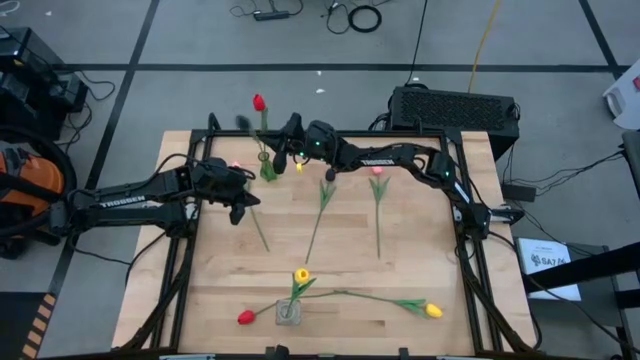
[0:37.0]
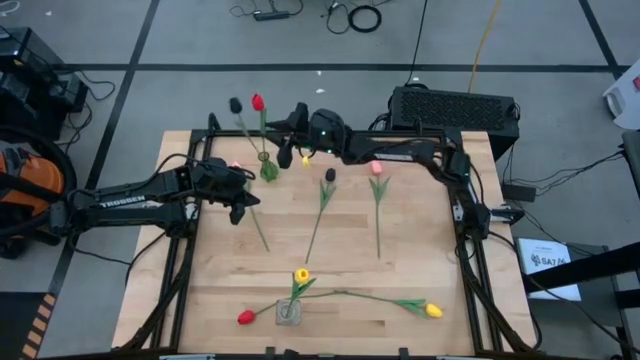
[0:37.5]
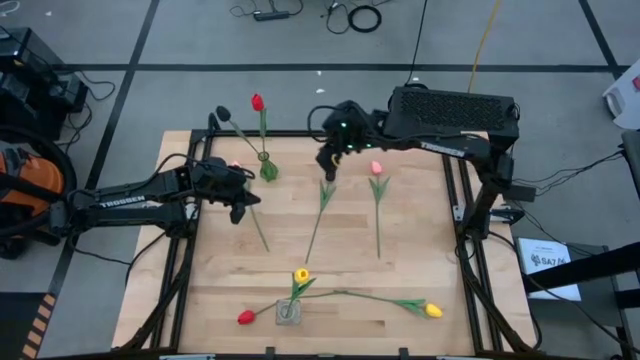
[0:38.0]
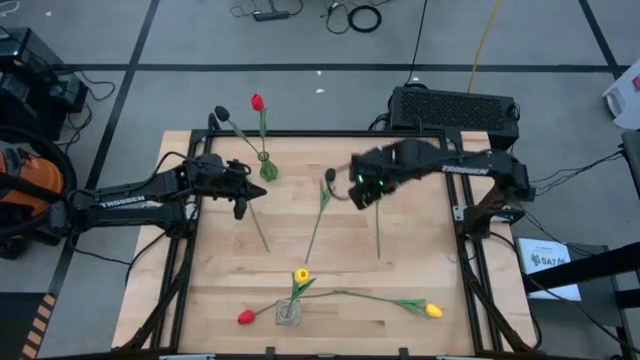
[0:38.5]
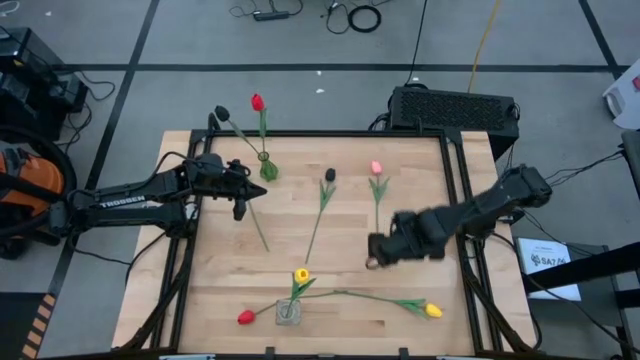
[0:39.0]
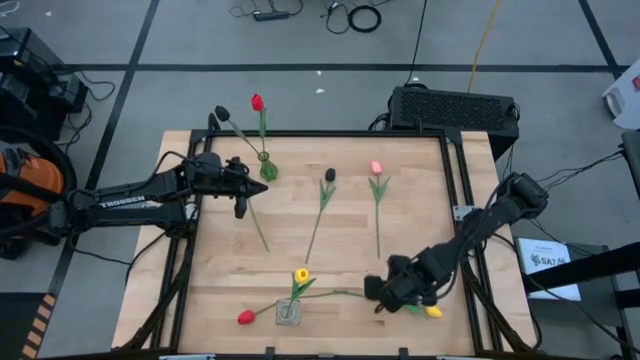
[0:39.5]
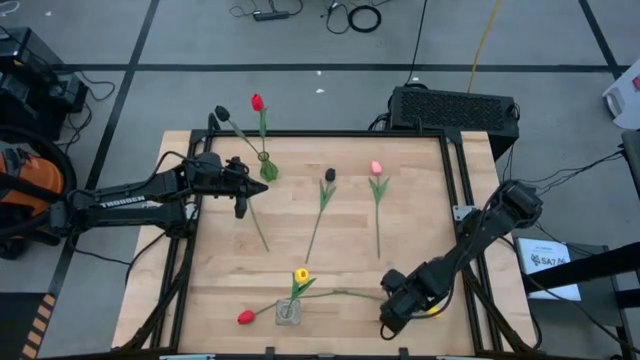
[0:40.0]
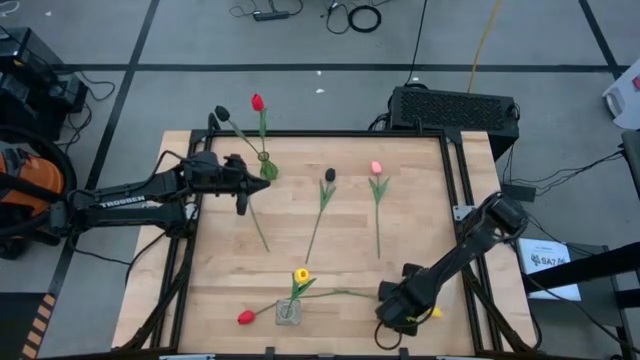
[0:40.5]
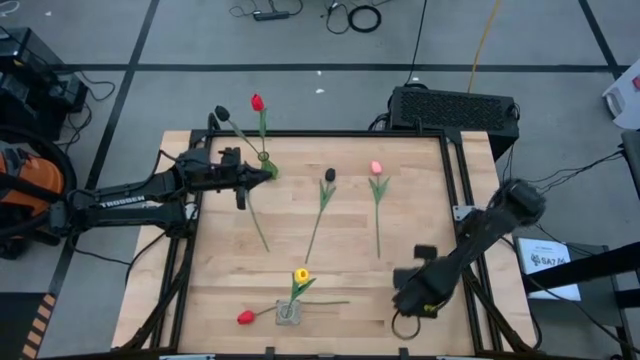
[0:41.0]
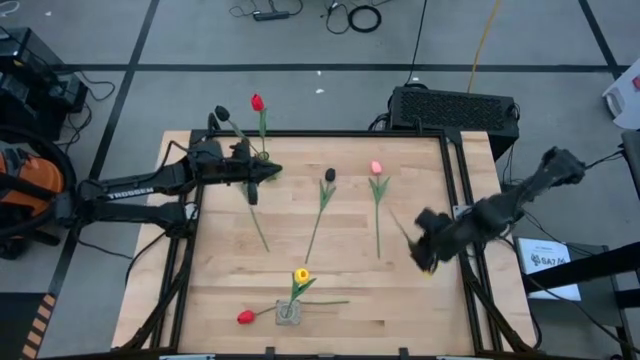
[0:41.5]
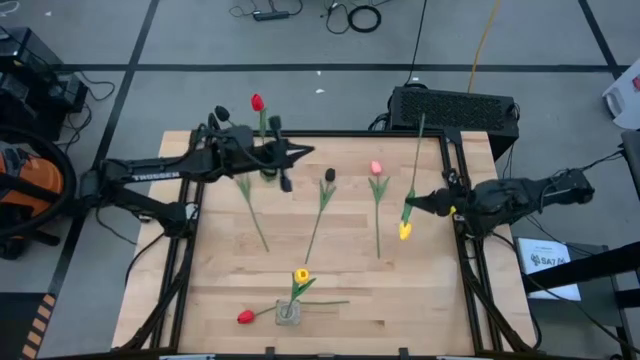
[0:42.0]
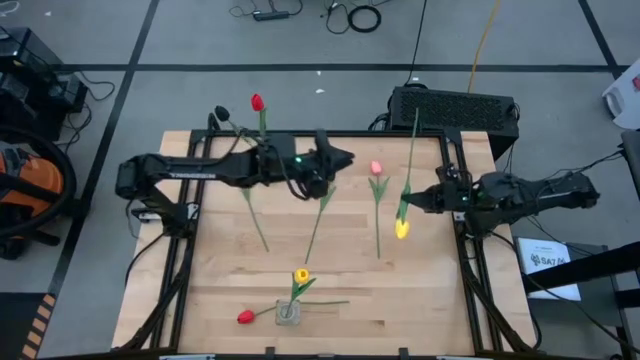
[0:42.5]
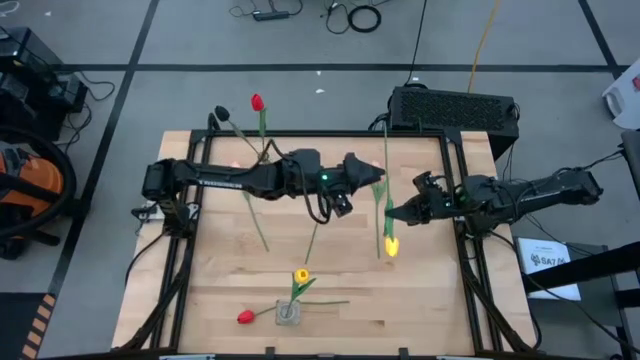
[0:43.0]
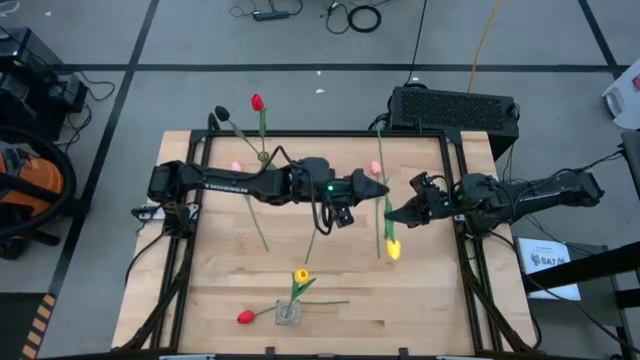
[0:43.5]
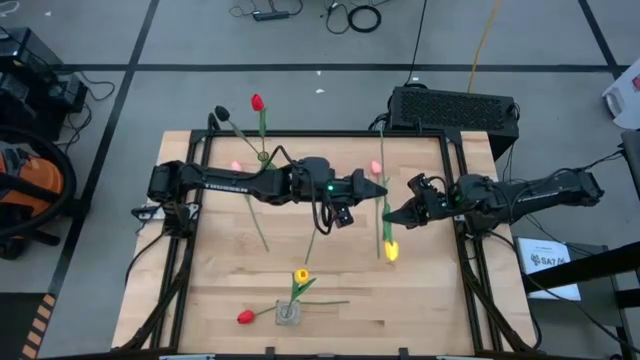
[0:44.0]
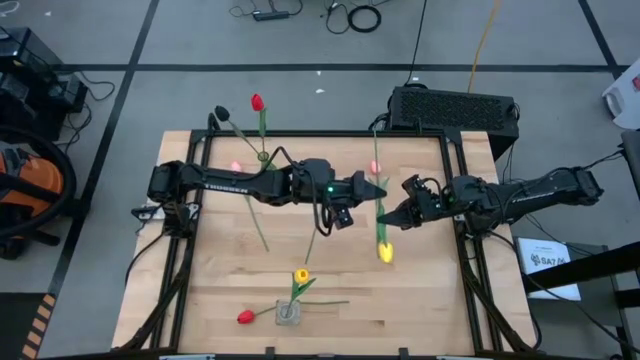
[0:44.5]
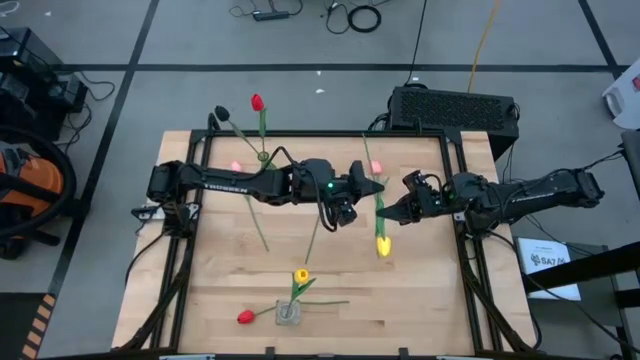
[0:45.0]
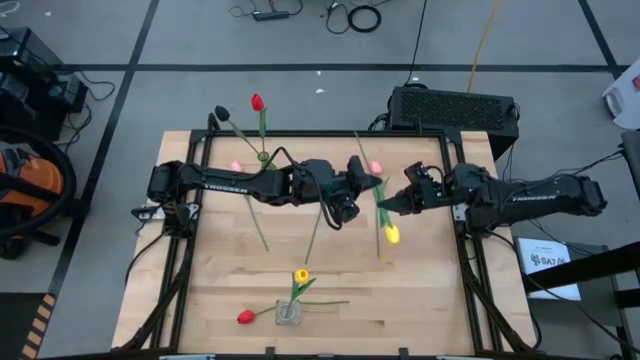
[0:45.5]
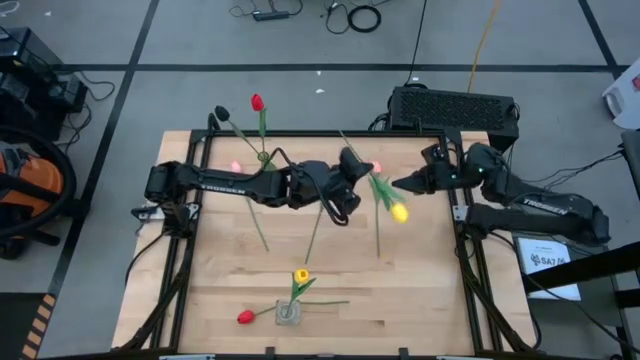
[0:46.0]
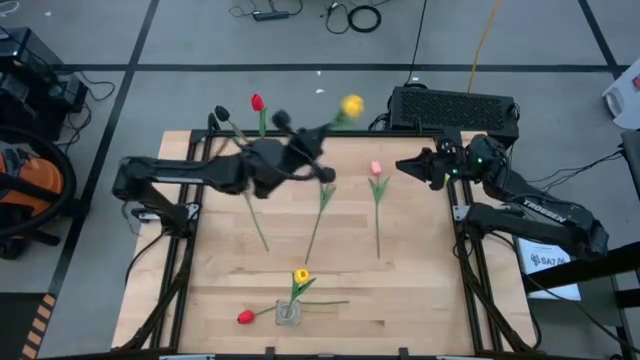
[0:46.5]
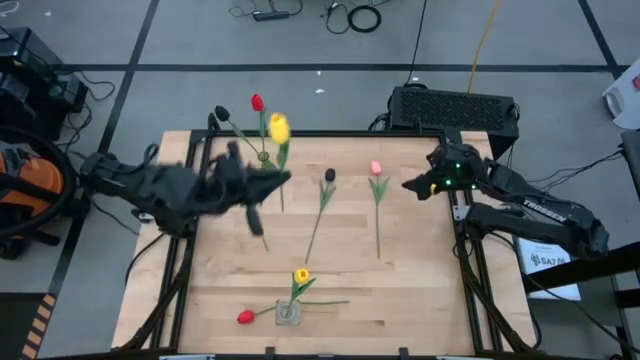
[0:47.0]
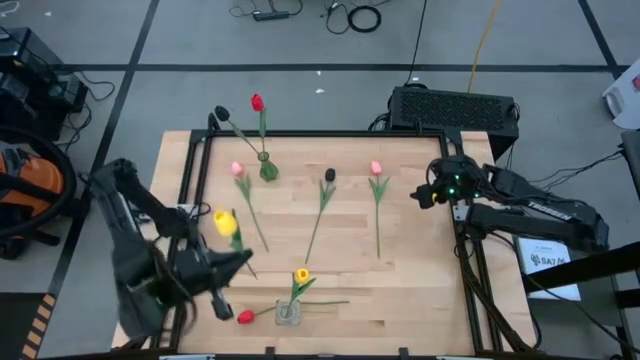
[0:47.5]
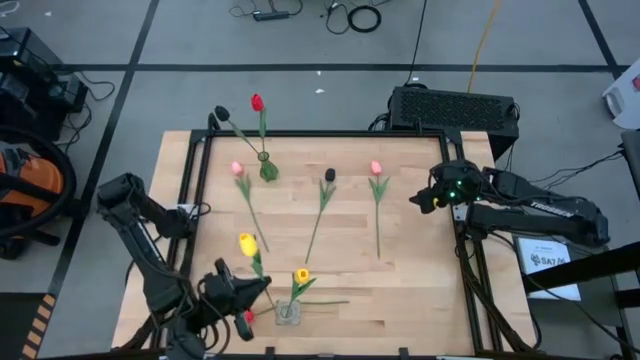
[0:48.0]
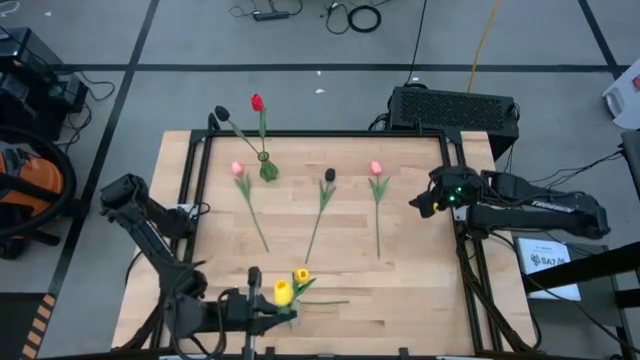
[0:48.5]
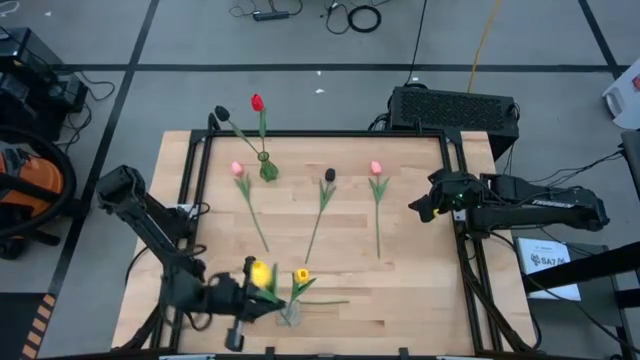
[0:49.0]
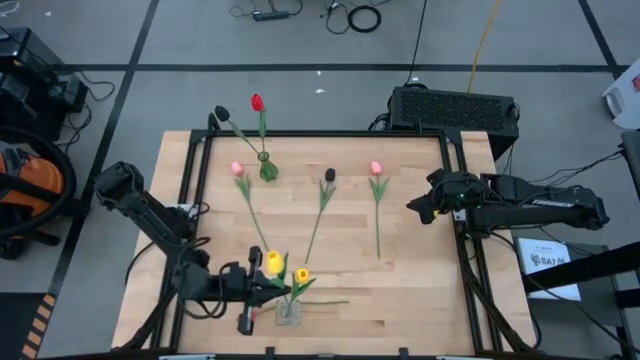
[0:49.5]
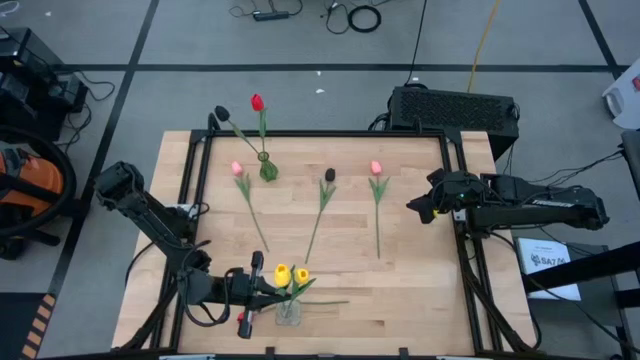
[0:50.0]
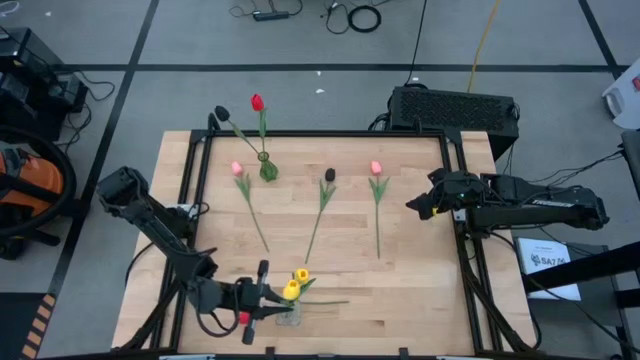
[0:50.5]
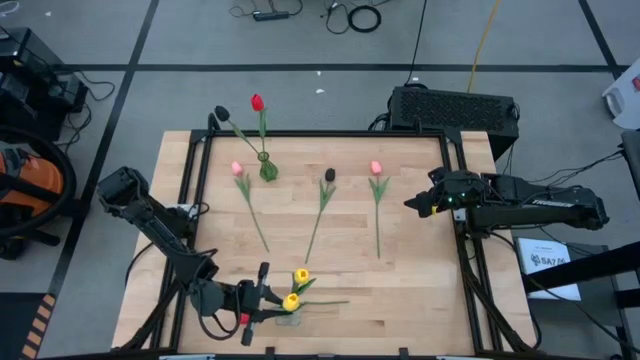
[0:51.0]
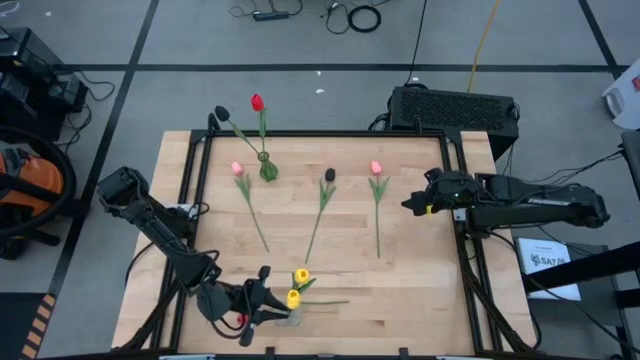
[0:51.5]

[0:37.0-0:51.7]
Task: Sort flowers into vase by color
Put the yellow flower into the transparent vase

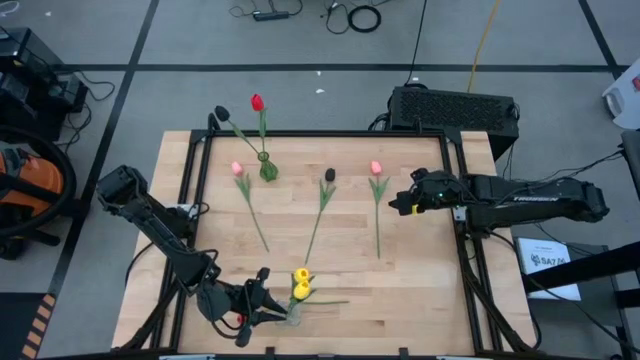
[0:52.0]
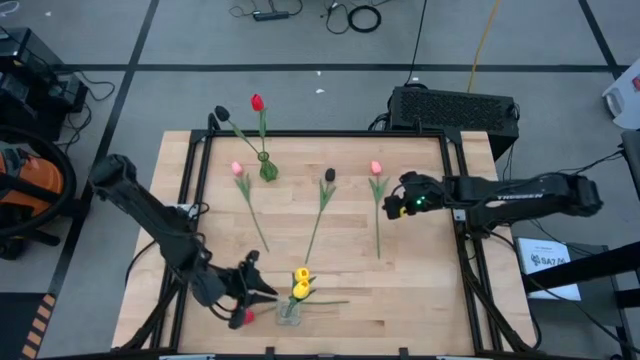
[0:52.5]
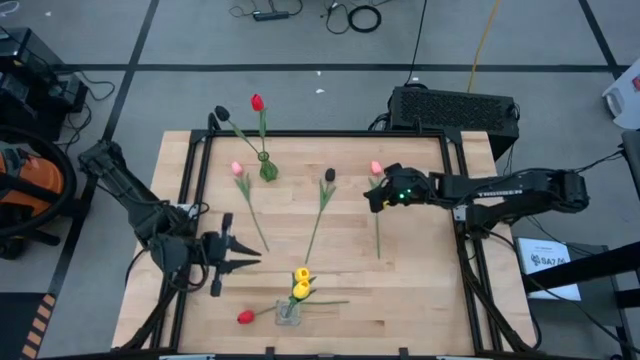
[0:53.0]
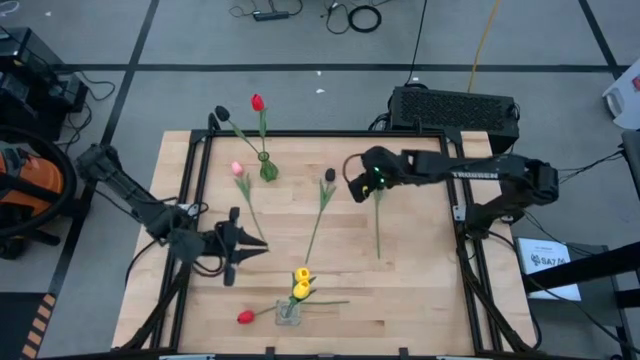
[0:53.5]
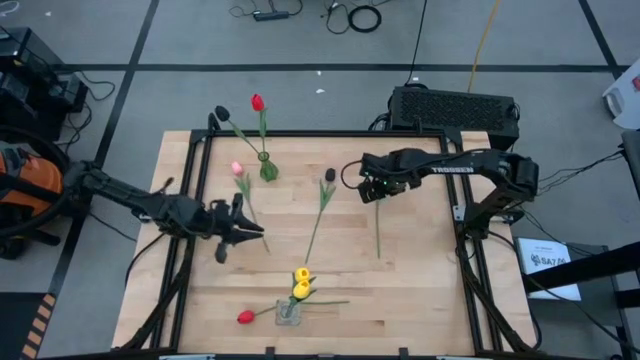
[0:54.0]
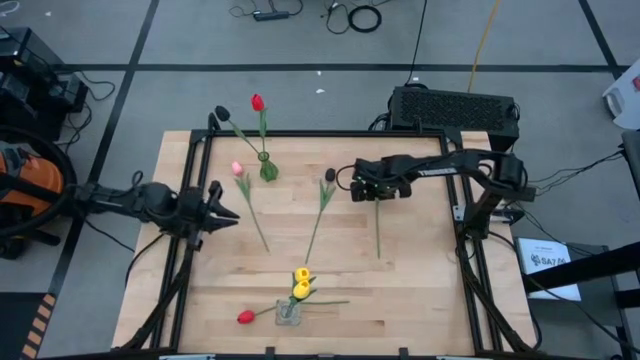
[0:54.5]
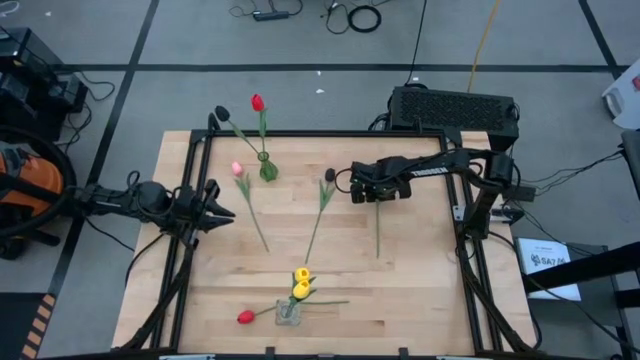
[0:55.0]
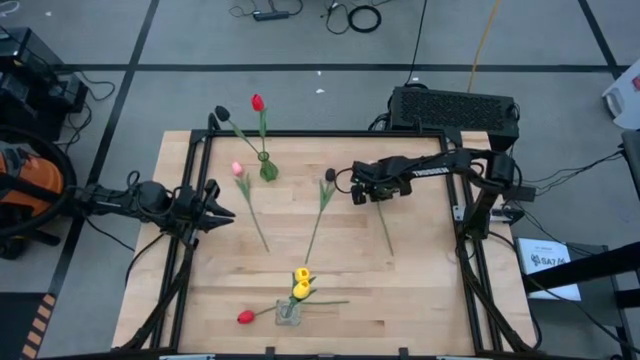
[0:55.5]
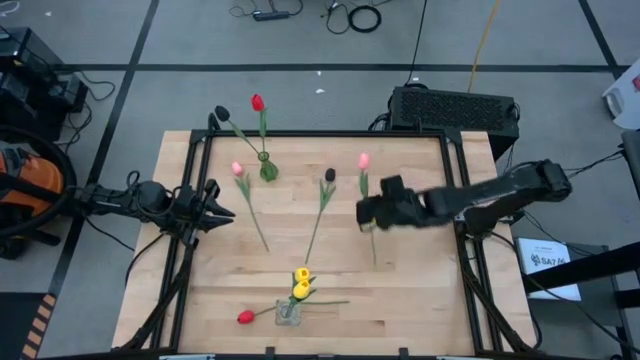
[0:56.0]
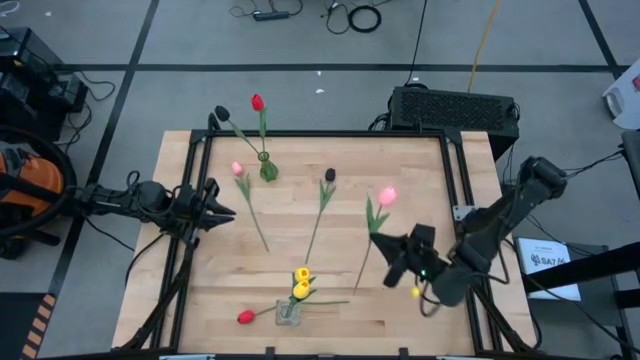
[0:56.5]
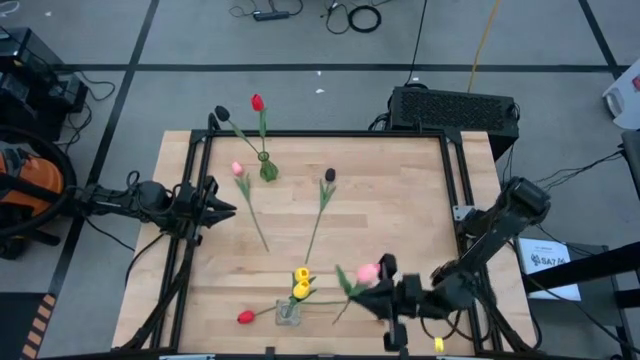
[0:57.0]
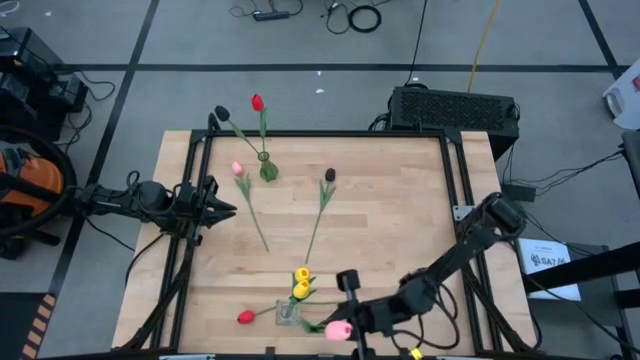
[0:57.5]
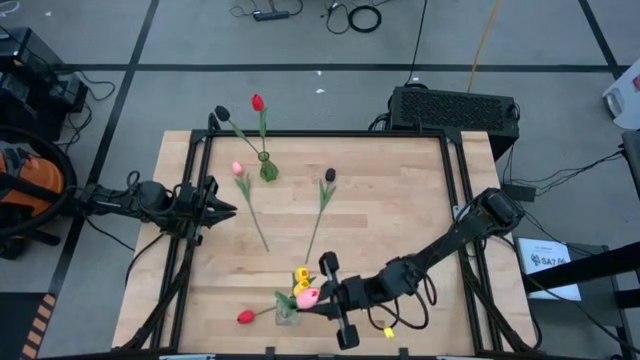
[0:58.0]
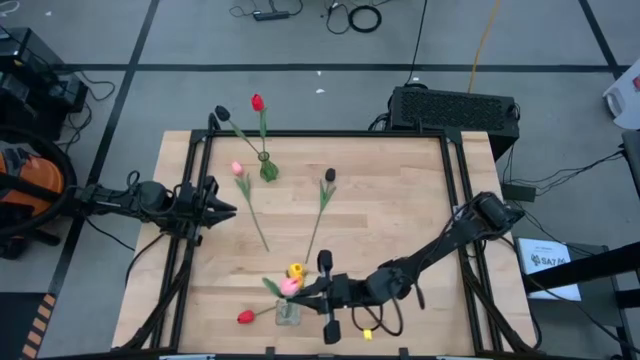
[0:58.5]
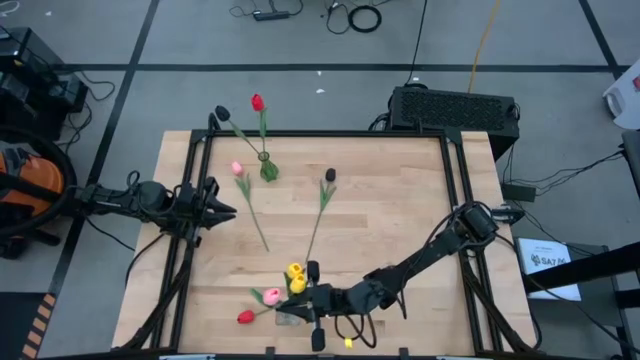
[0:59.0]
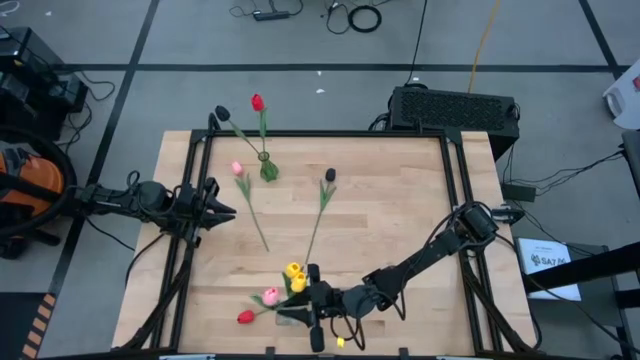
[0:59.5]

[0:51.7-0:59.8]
Put the right pink flower into the transparent vase
